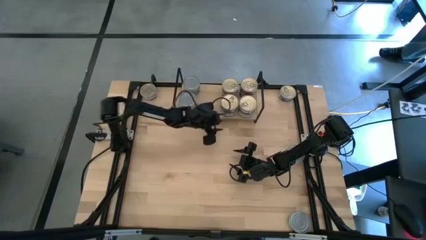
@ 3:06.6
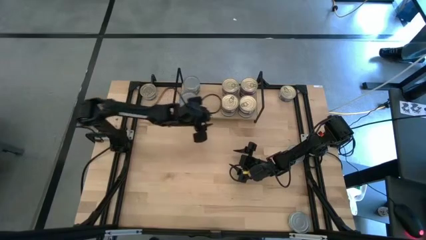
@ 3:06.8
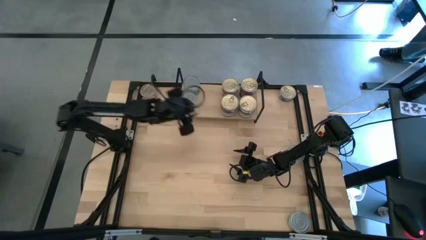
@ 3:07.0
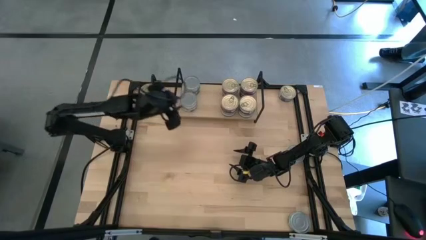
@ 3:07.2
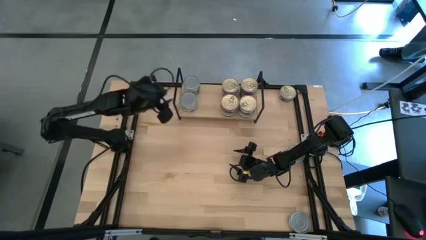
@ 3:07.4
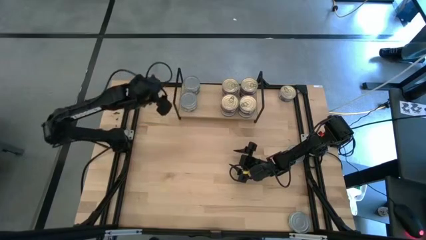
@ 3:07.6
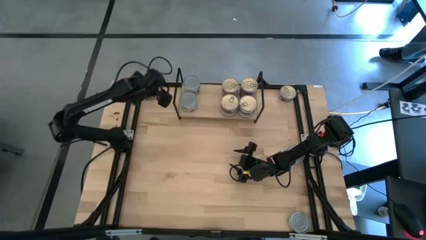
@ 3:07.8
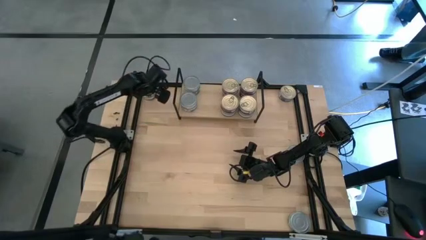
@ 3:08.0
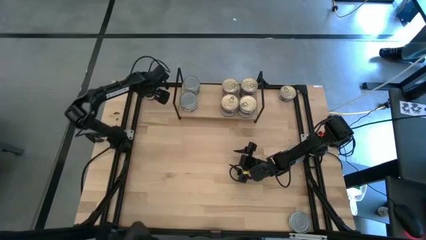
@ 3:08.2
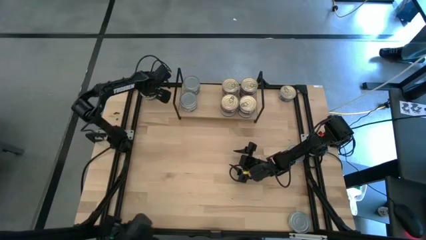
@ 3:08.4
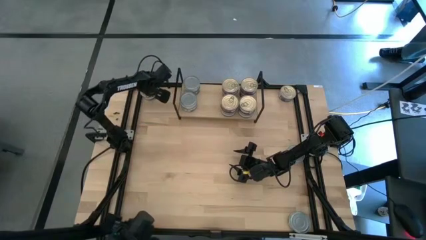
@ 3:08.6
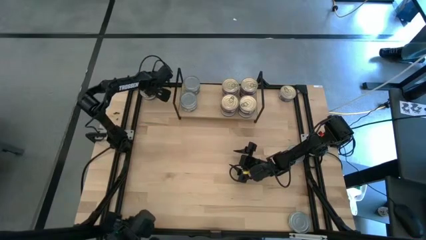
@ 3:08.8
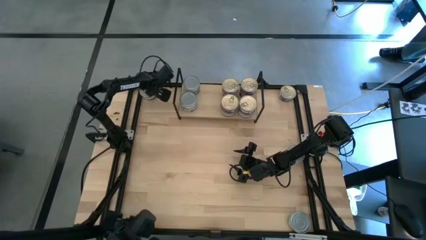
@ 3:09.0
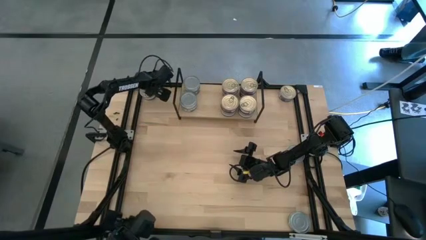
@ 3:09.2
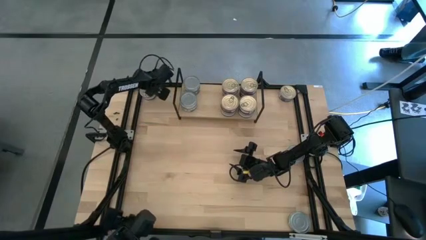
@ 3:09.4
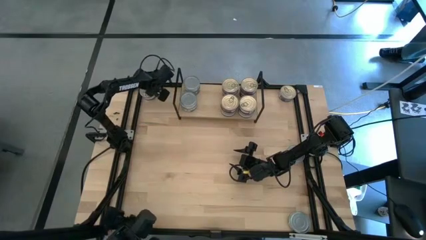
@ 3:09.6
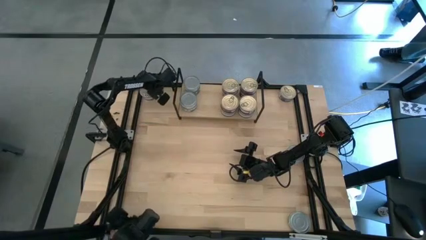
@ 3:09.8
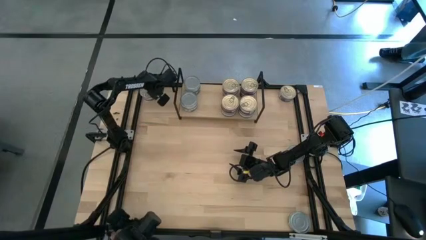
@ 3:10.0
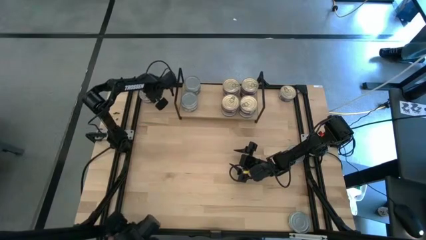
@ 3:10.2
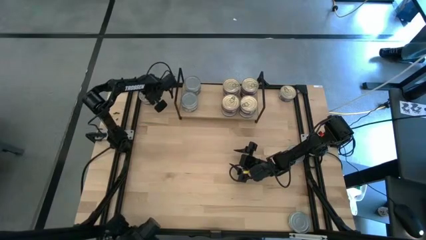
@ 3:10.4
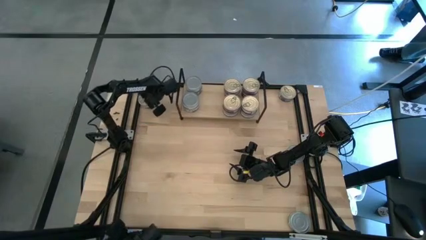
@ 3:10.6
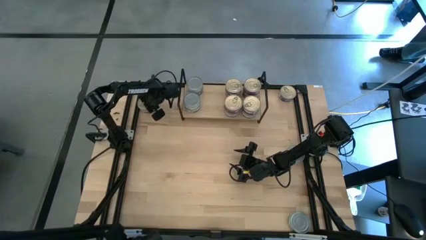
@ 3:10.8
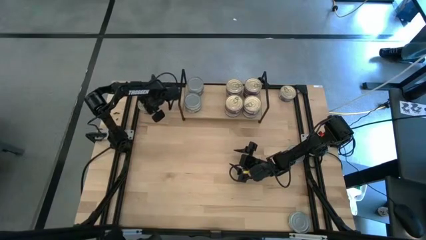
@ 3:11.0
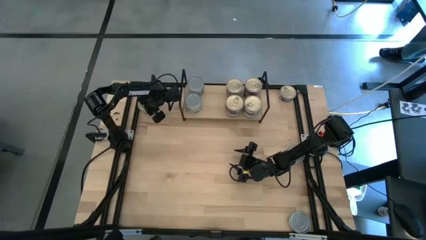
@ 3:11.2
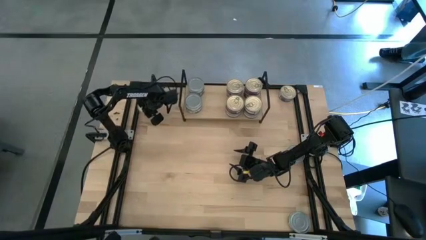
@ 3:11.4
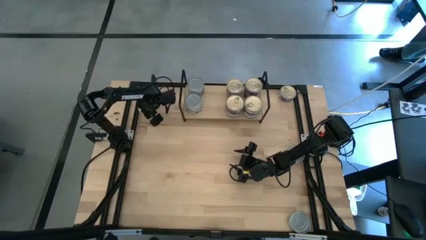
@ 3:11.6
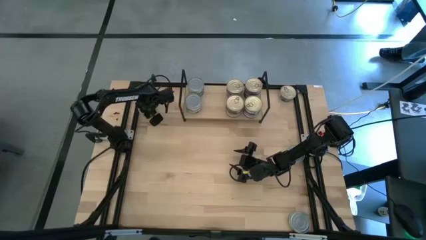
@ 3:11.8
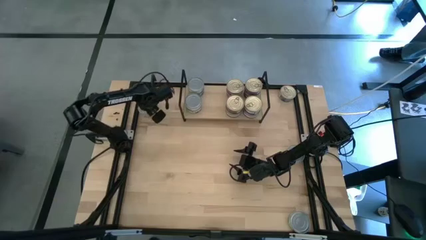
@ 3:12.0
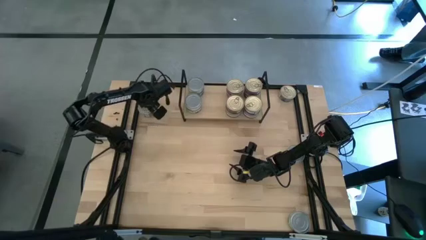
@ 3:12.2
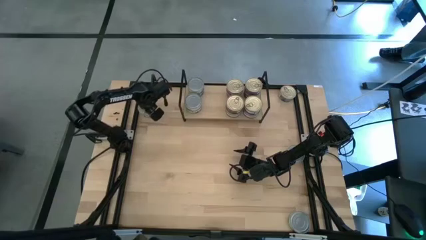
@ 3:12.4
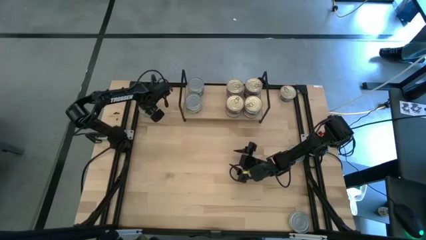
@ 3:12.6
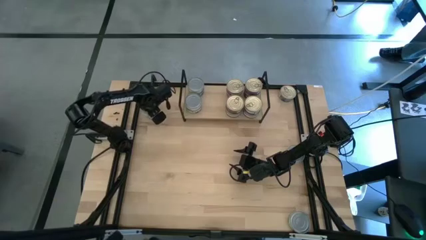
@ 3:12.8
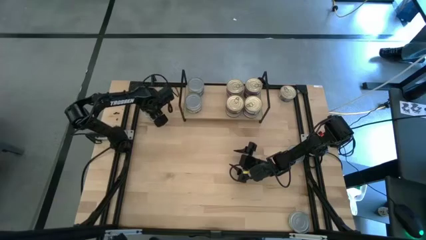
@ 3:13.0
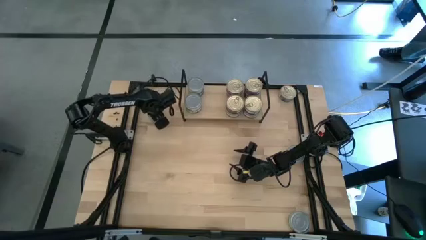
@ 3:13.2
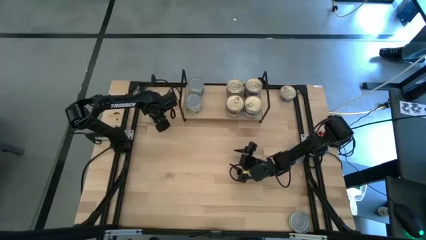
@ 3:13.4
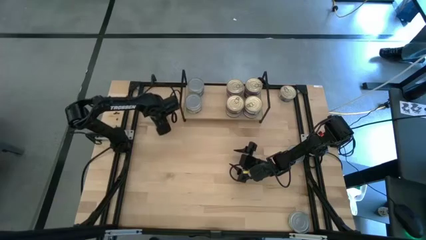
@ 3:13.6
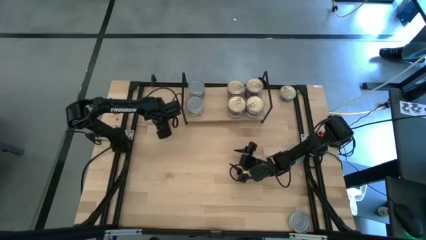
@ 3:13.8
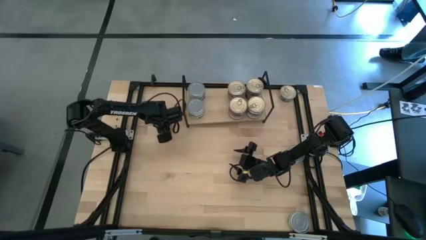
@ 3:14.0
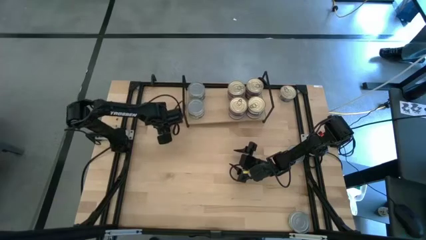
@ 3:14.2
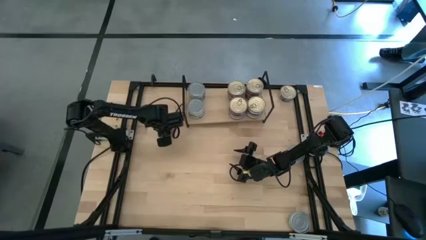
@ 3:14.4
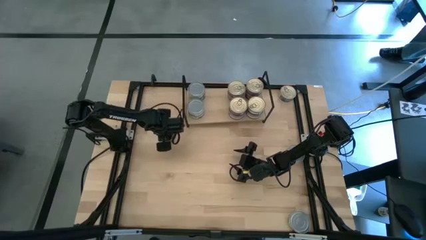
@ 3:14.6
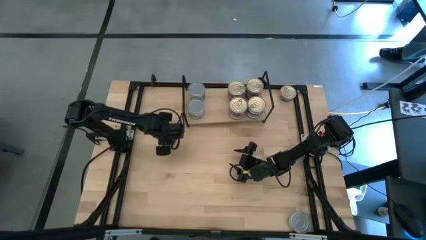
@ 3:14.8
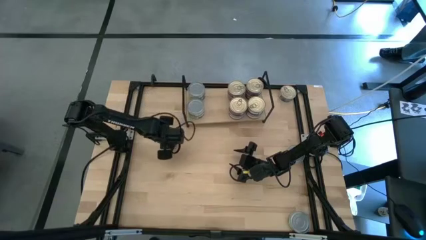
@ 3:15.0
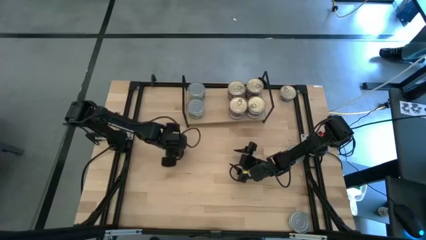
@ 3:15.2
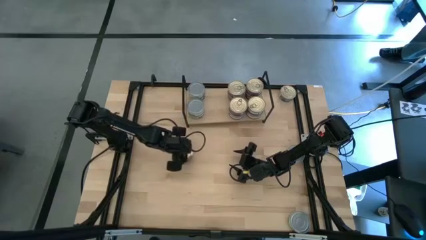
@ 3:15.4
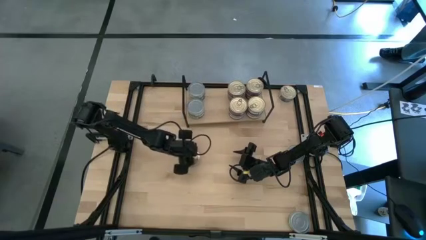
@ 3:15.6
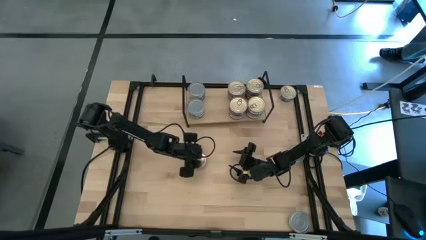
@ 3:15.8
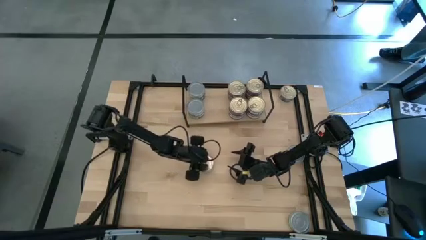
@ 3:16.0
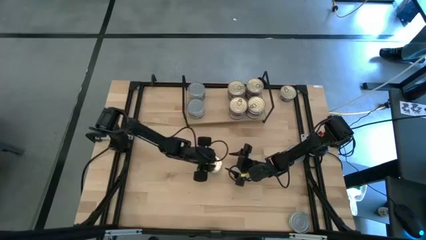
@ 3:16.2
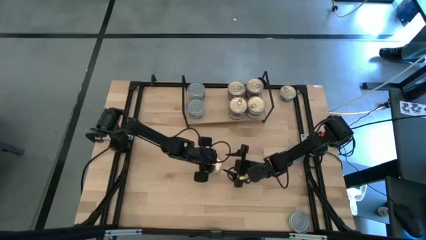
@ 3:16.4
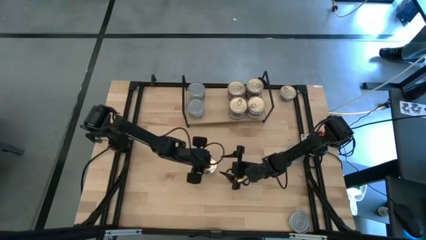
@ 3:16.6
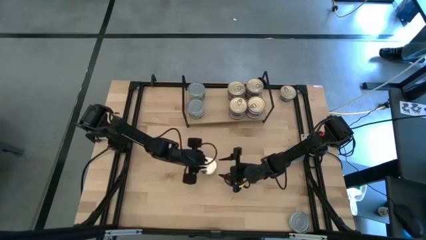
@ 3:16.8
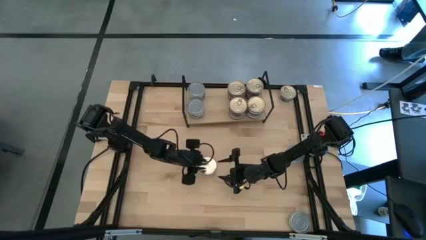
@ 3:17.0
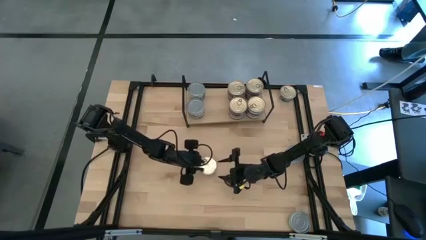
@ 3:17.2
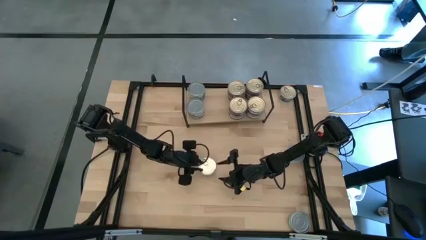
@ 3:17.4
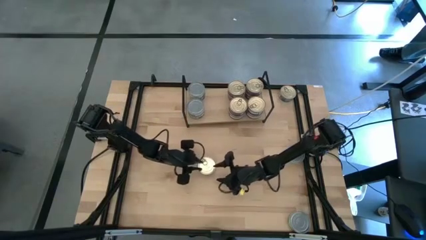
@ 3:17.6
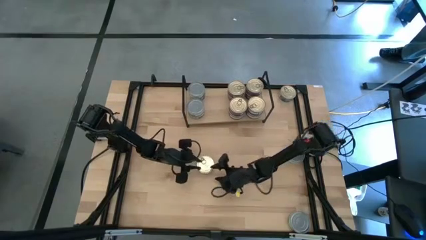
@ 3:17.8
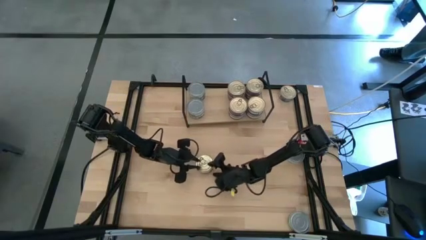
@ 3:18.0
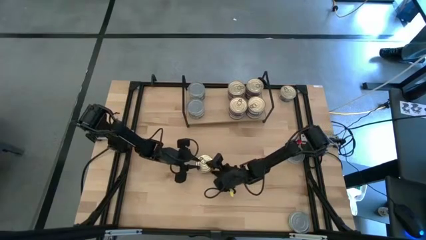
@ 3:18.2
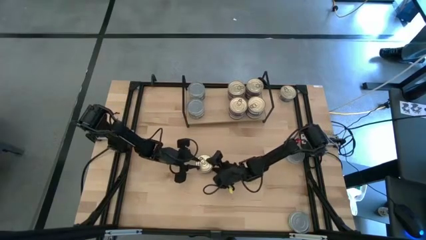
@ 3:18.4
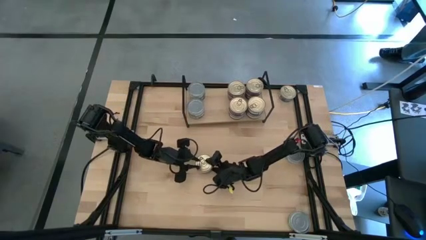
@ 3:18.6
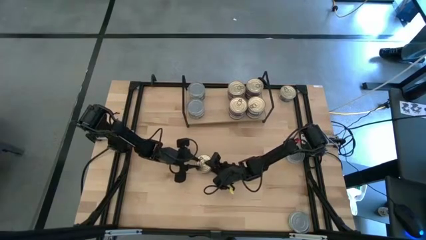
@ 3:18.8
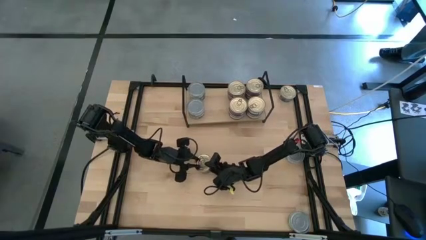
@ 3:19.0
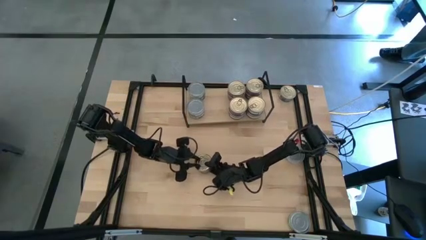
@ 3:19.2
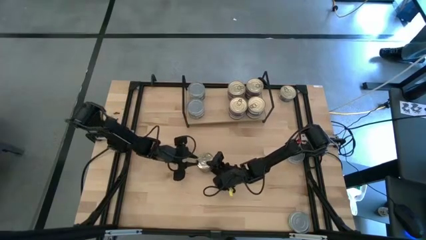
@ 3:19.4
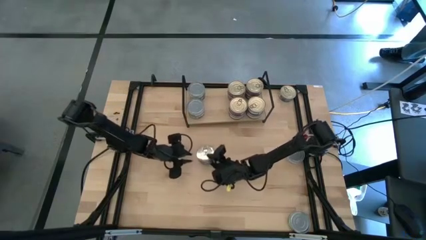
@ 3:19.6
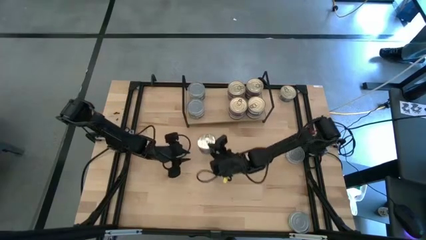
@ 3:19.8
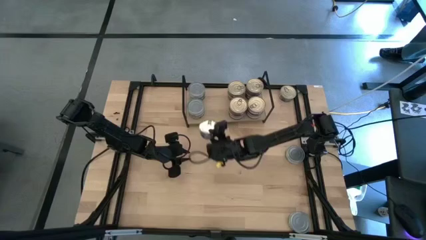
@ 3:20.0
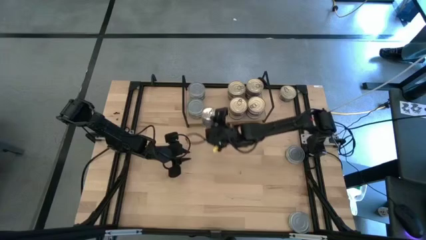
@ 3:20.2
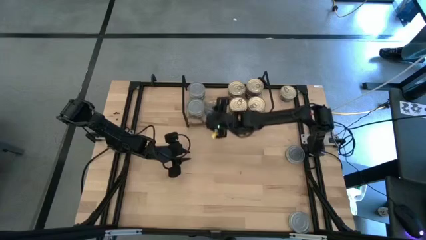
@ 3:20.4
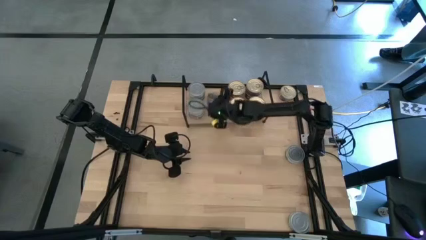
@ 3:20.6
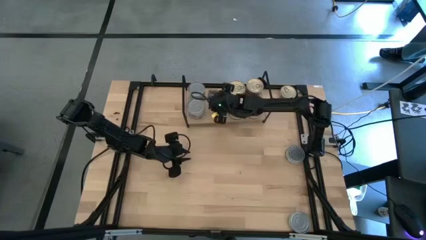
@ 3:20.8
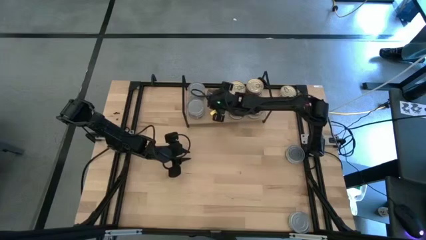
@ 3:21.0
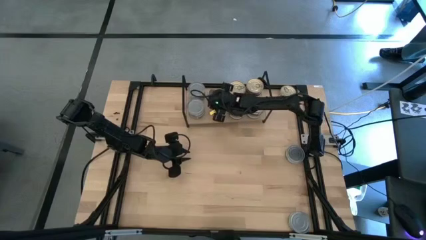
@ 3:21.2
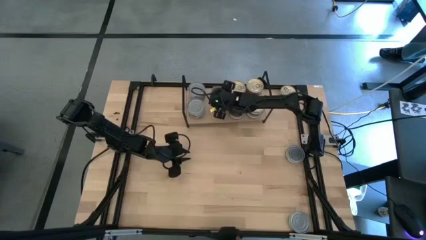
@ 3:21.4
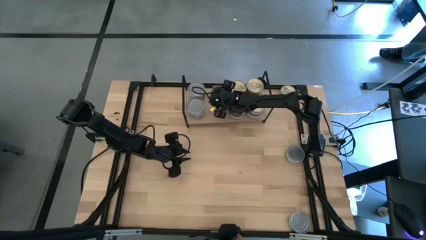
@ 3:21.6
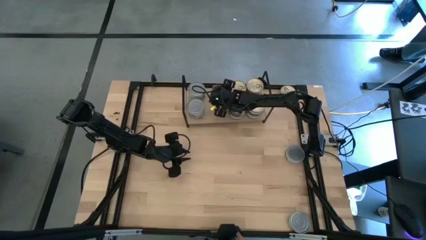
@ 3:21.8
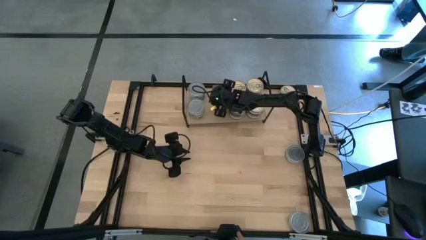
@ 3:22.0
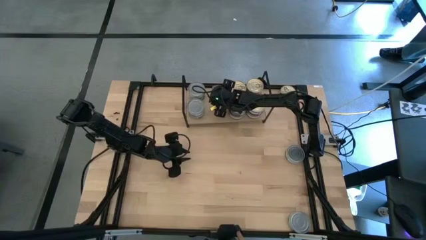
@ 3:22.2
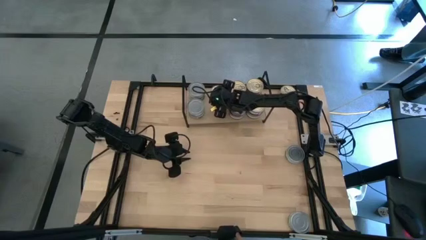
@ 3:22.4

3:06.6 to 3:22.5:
Task: Stack canned seafood by type on shelf
Put the blue pink tuna can on the shelf

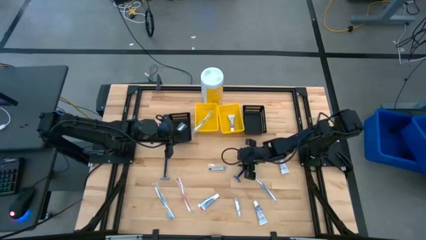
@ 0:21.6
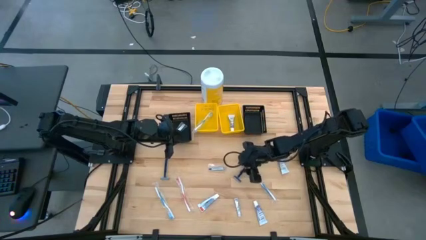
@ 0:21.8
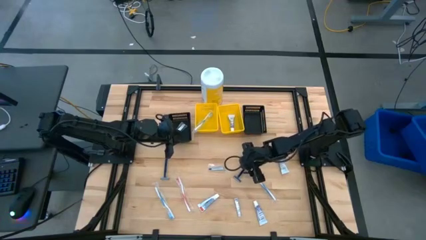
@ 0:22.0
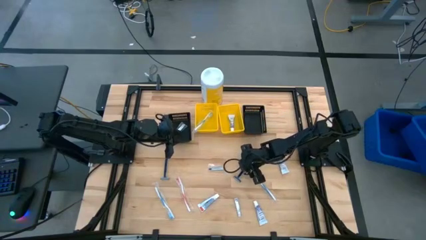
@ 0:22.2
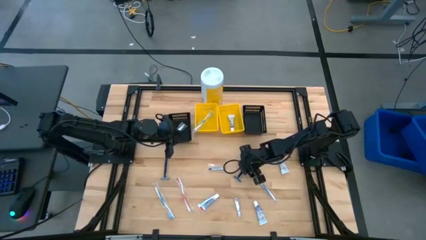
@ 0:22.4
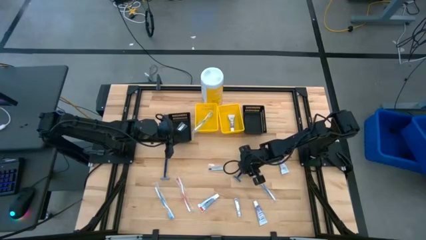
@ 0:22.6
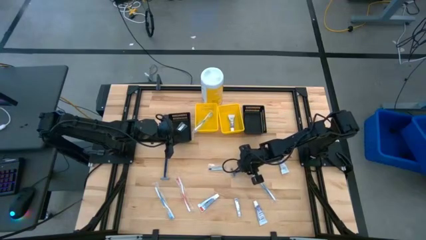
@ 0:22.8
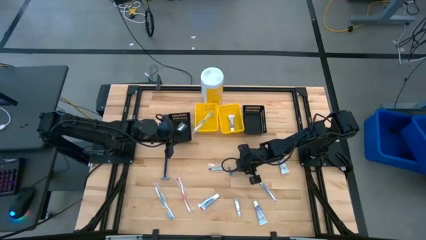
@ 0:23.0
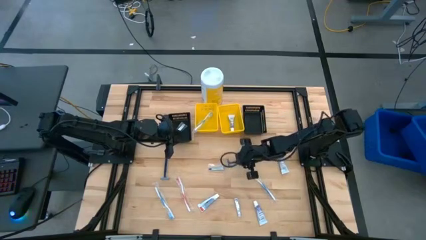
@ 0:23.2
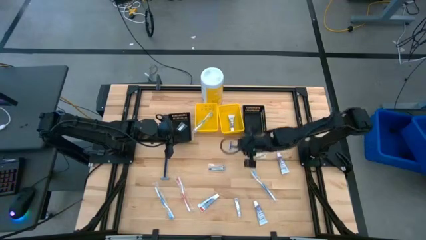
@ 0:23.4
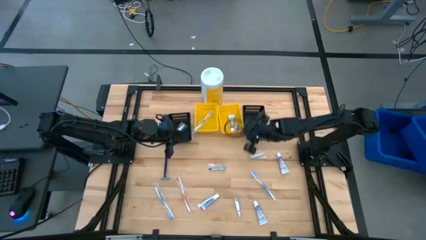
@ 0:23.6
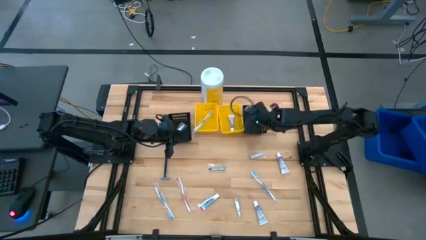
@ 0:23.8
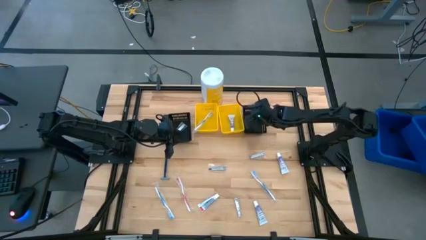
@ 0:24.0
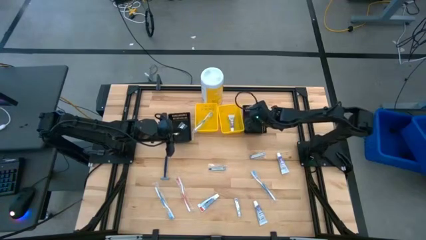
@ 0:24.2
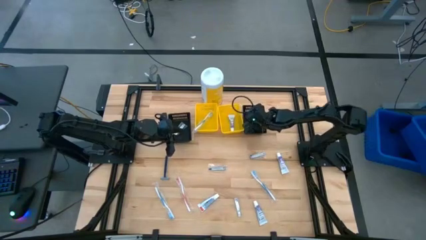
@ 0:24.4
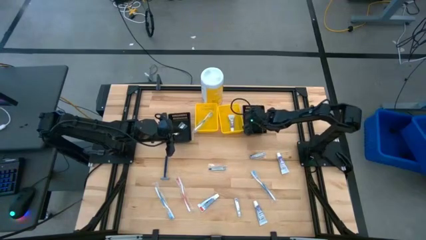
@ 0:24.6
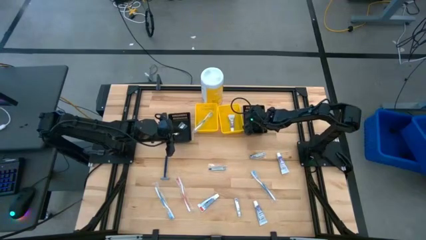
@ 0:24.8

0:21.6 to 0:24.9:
Task: Pick & Place Travel size toiletries
Put the blue razor into the right black bin
